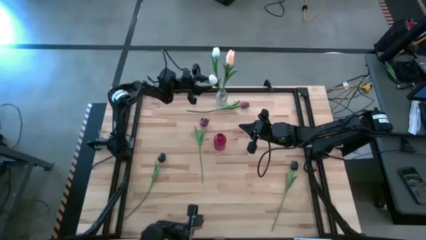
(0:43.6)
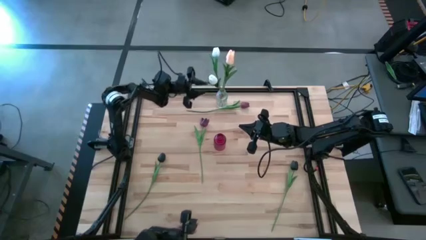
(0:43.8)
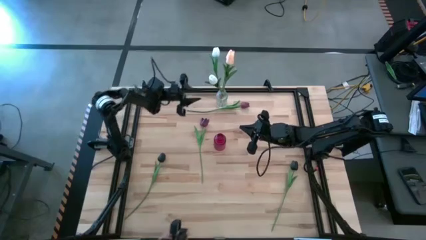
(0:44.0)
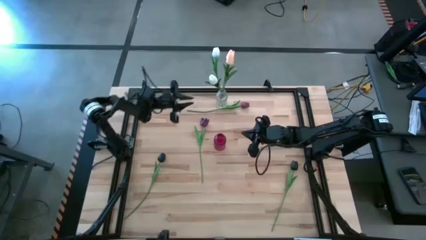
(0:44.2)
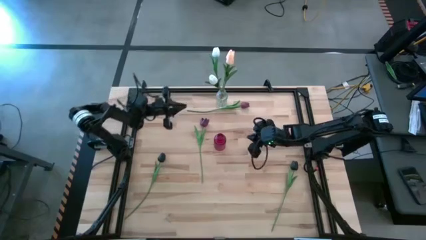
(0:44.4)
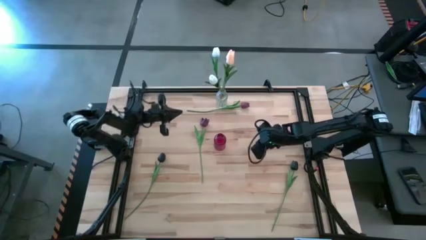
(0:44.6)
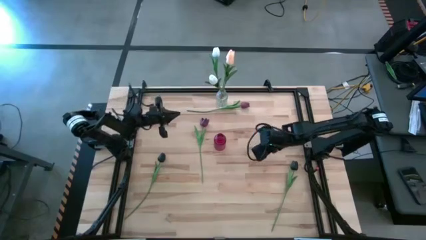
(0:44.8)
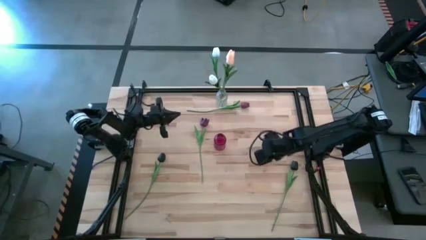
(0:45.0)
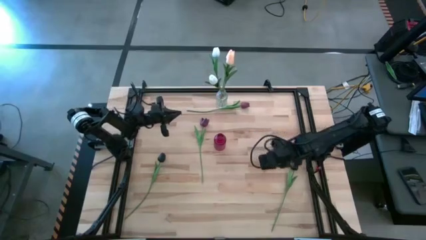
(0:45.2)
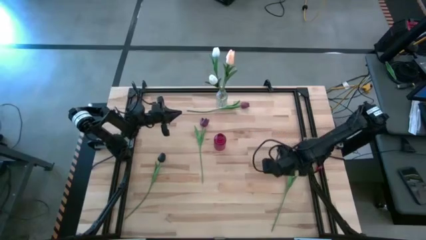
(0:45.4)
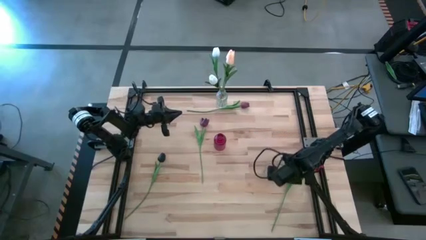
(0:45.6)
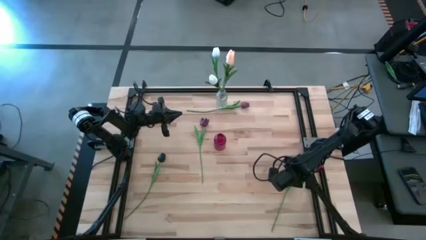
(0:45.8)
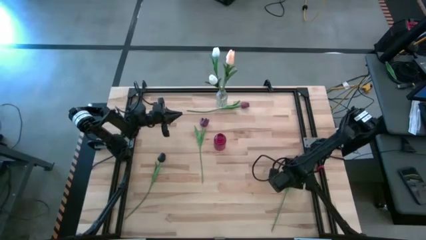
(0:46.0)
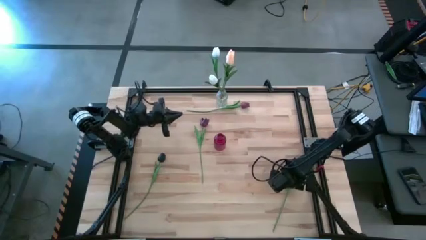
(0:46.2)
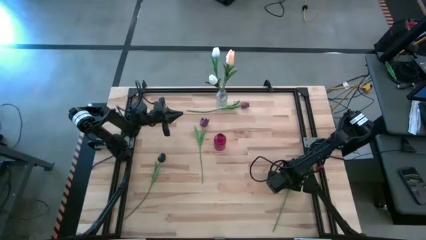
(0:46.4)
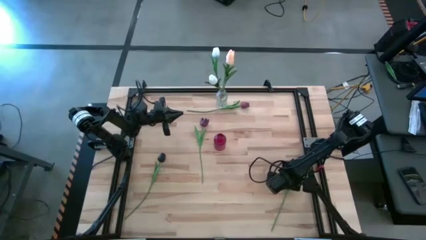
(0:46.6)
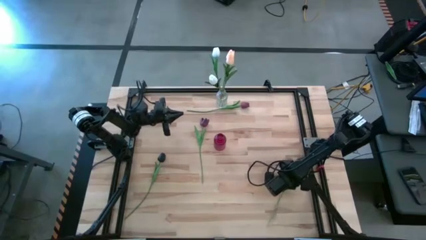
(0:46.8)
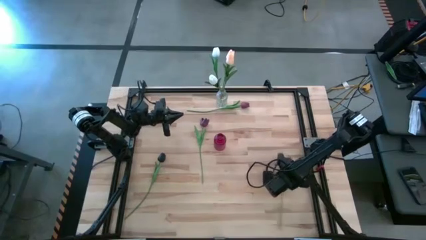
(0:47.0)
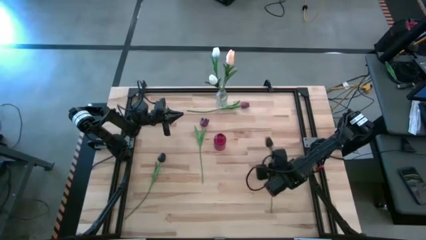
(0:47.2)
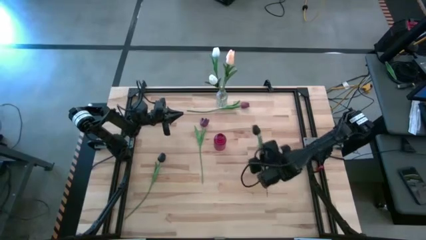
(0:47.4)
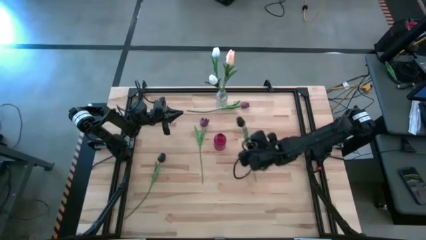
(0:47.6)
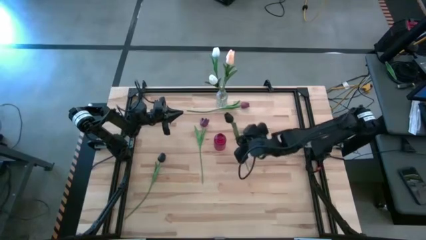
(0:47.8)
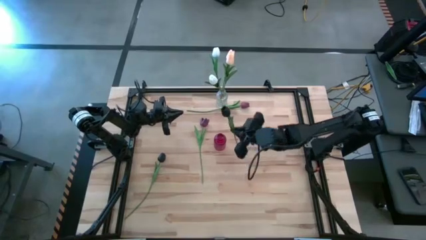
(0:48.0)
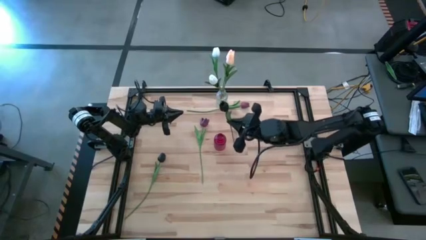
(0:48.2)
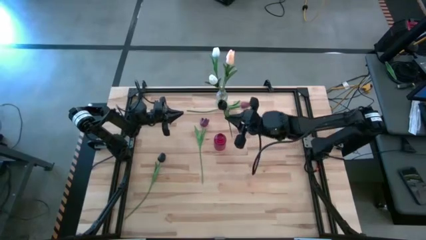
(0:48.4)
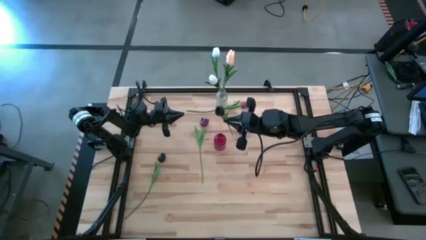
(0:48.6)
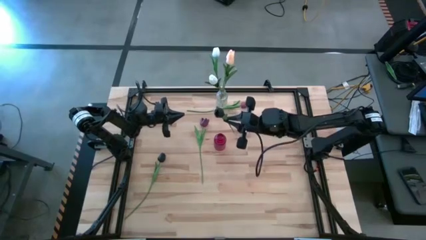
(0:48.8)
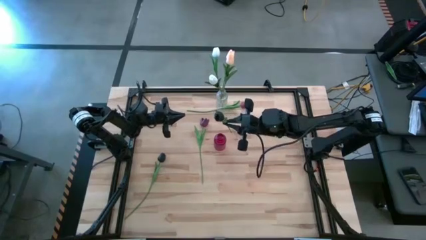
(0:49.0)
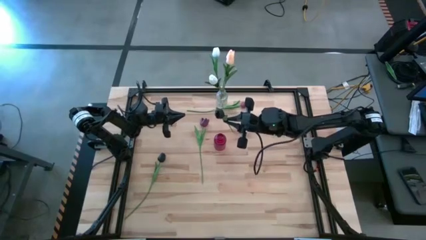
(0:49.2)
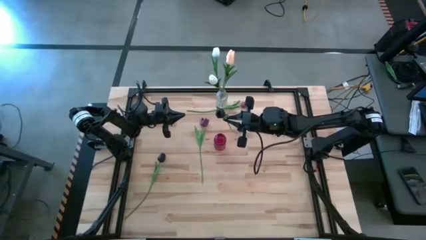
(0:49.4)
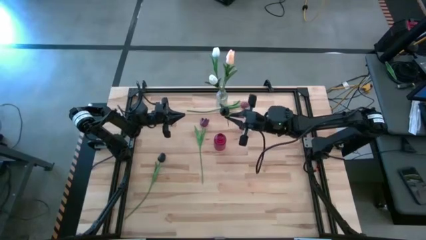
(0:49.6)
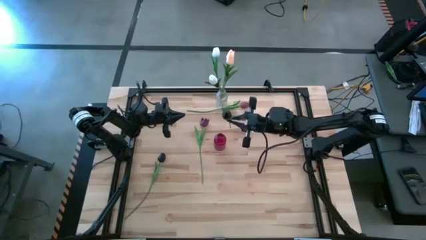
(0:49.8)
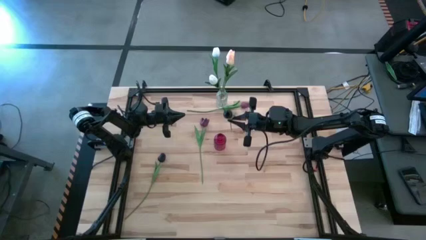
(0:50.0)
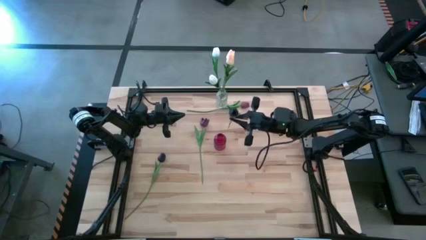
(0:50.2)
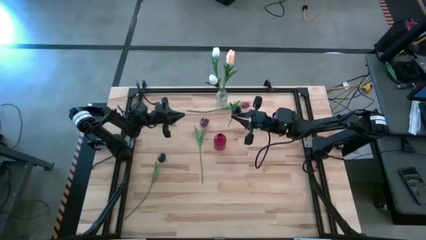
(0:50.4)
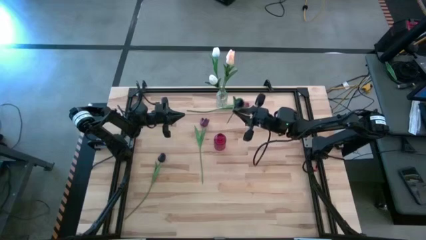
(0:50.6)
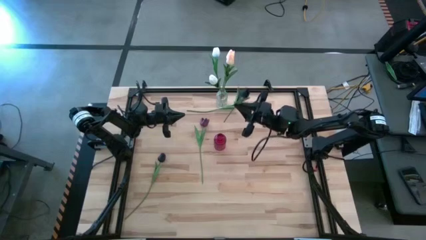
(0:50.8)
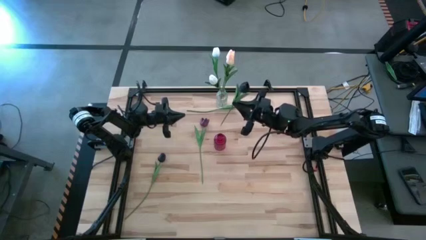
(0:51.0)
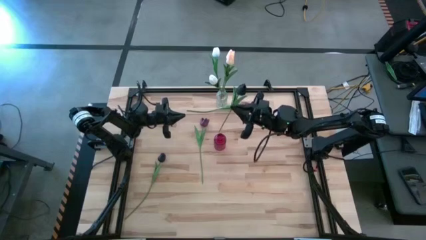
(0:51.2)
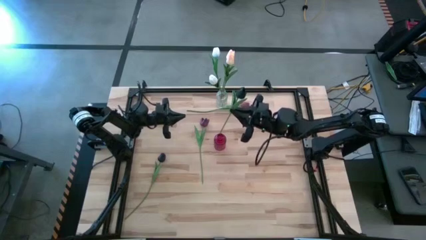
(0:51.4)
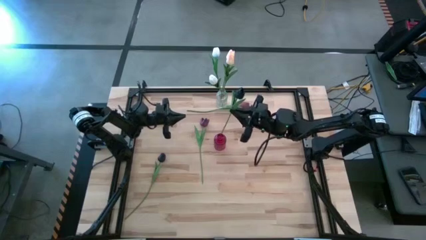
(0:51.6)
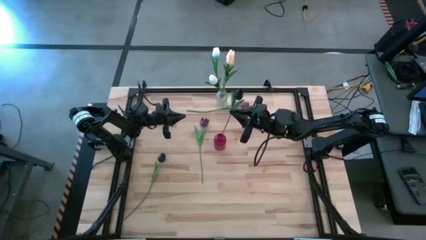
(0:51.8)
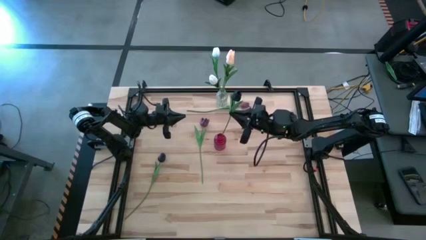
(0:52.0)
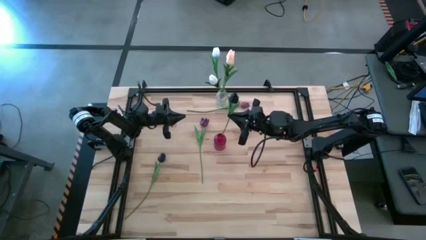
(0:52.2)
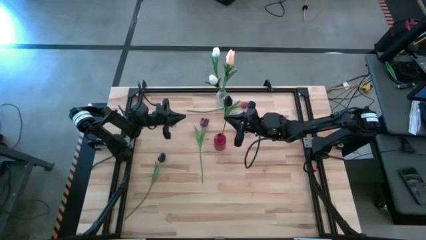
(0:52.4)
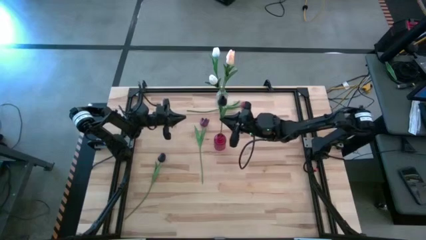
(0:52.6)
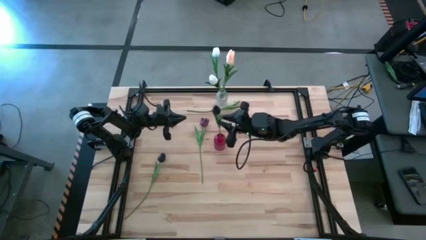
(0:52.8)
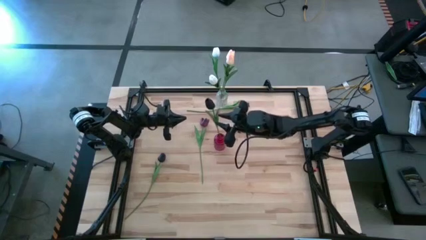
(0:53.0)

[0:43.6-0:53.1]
Task: Sort flowers into vase by color
Put the right black flower into the red vase

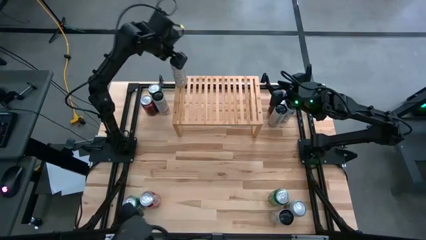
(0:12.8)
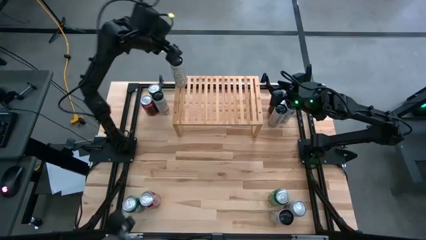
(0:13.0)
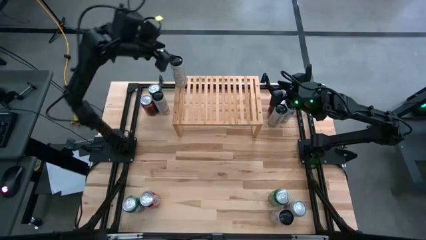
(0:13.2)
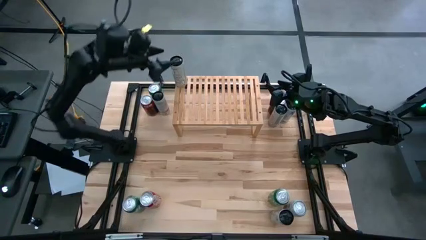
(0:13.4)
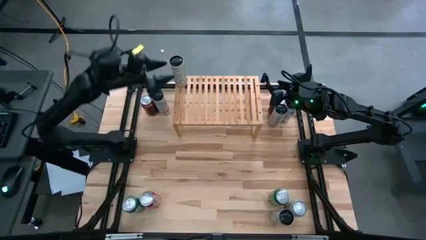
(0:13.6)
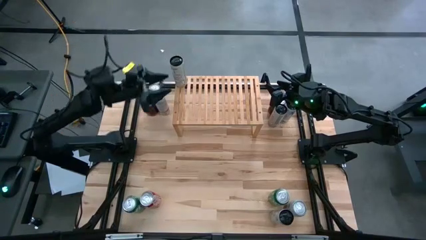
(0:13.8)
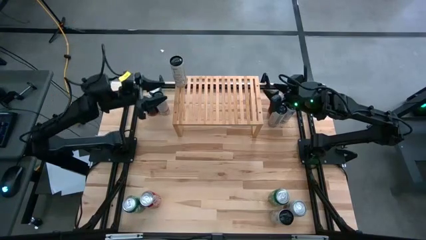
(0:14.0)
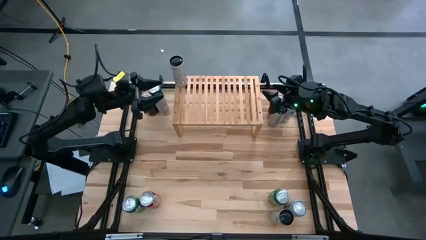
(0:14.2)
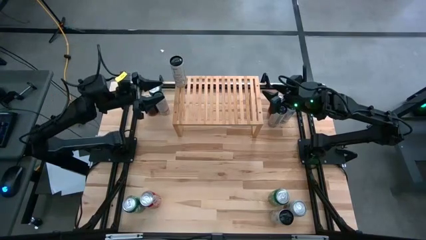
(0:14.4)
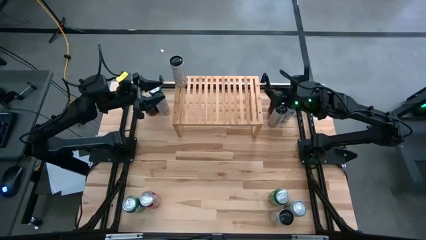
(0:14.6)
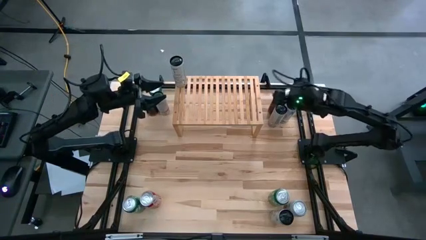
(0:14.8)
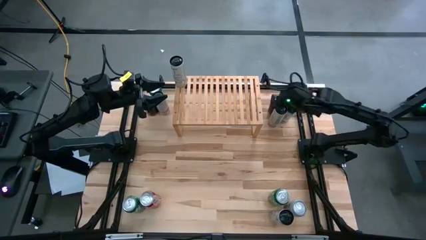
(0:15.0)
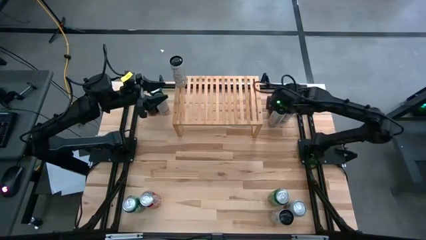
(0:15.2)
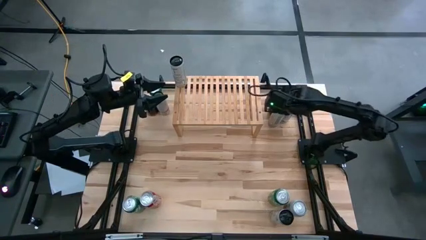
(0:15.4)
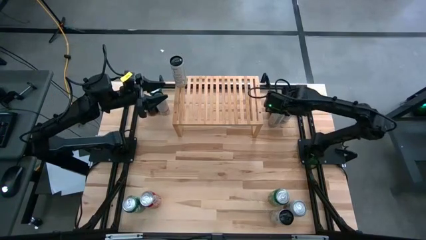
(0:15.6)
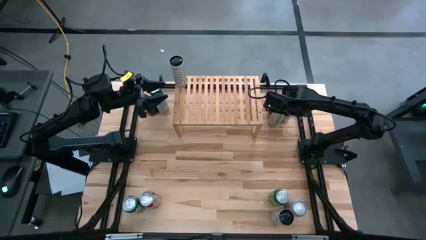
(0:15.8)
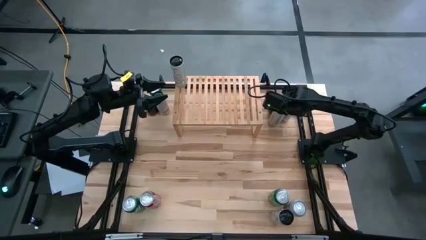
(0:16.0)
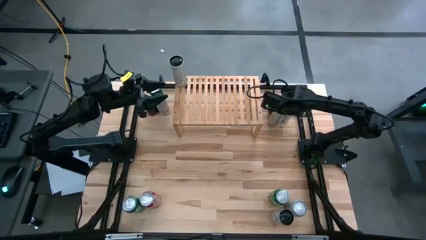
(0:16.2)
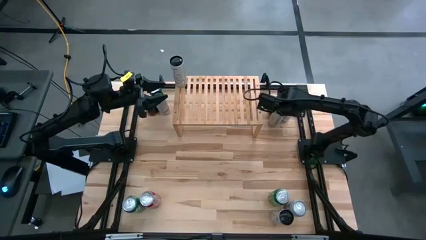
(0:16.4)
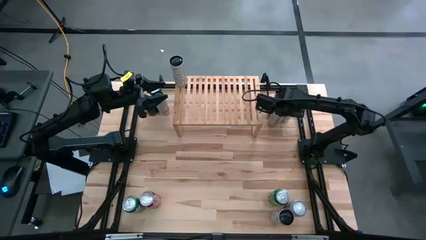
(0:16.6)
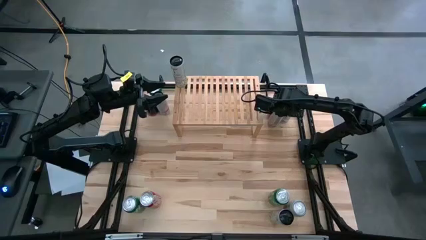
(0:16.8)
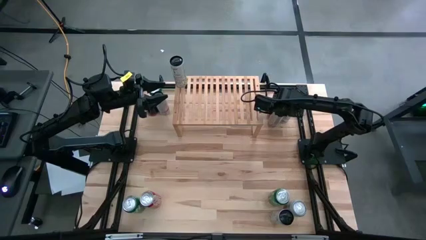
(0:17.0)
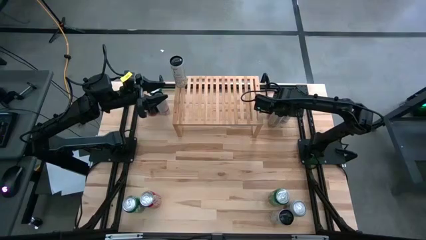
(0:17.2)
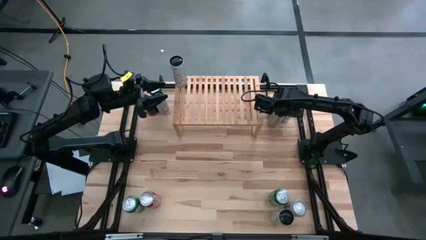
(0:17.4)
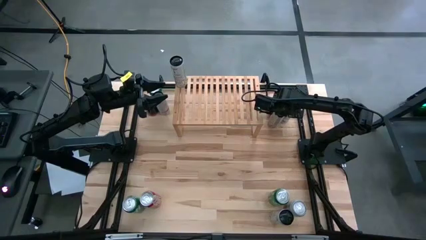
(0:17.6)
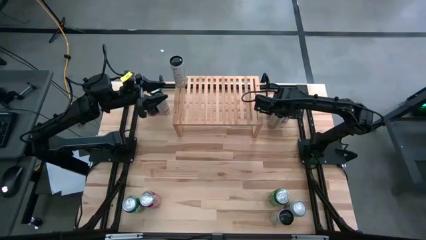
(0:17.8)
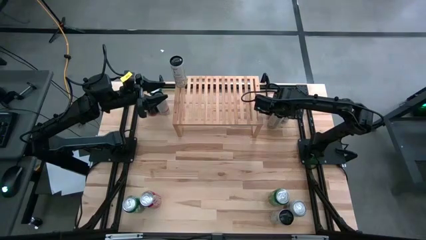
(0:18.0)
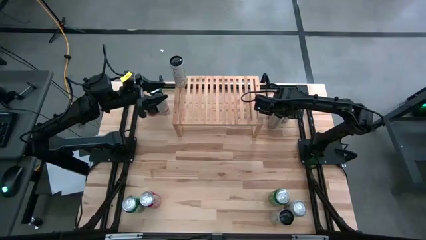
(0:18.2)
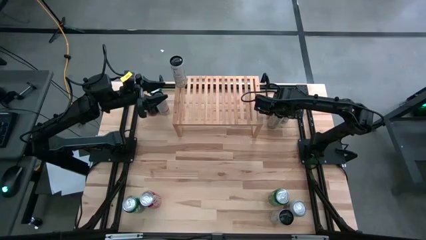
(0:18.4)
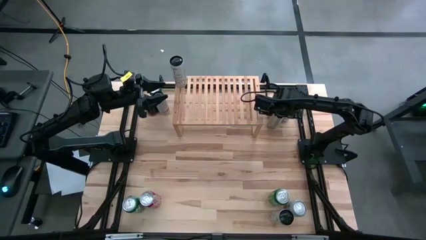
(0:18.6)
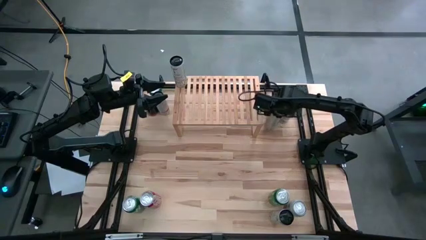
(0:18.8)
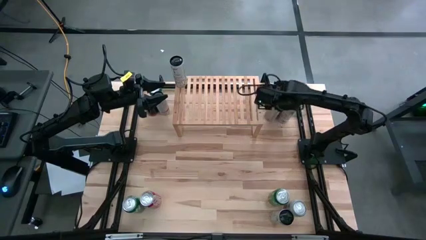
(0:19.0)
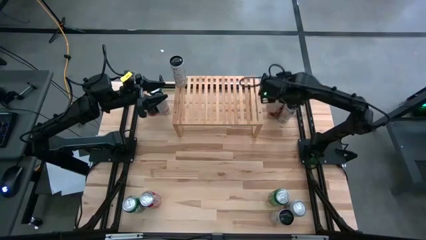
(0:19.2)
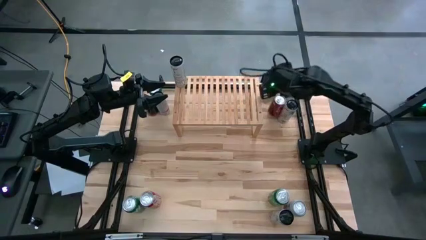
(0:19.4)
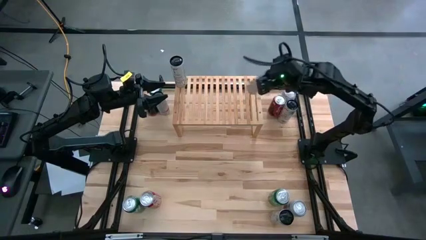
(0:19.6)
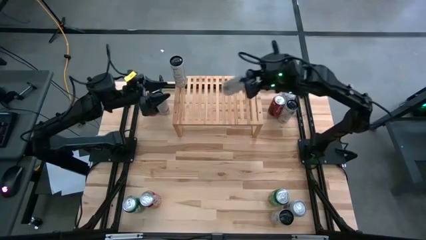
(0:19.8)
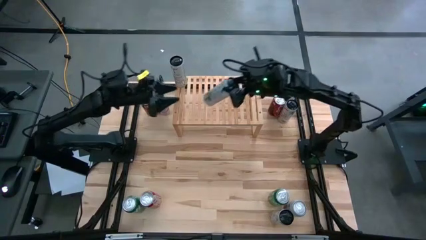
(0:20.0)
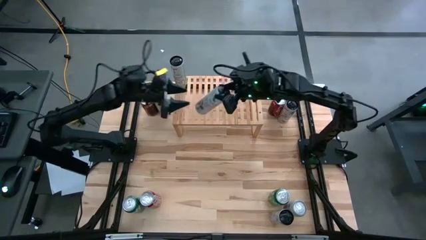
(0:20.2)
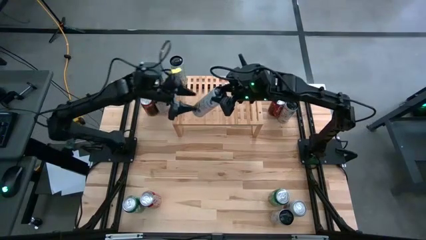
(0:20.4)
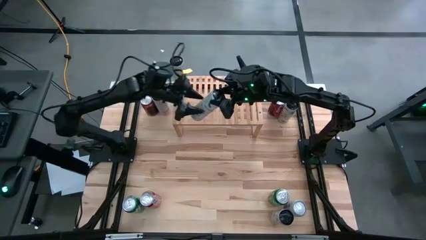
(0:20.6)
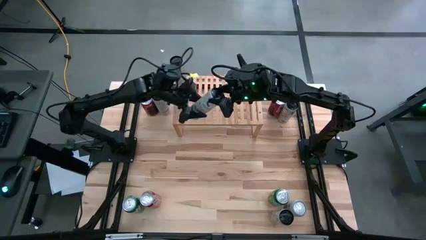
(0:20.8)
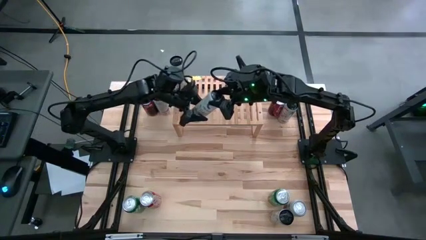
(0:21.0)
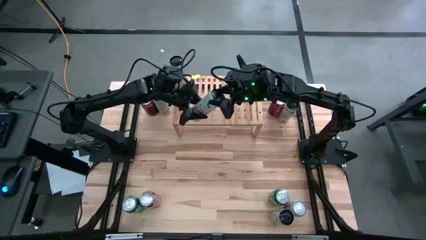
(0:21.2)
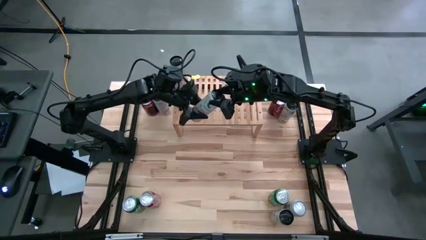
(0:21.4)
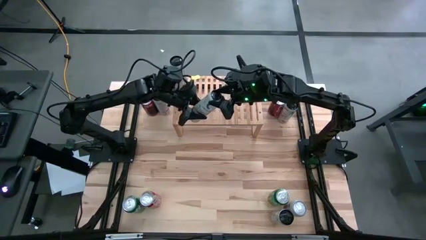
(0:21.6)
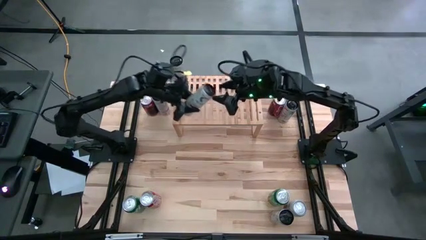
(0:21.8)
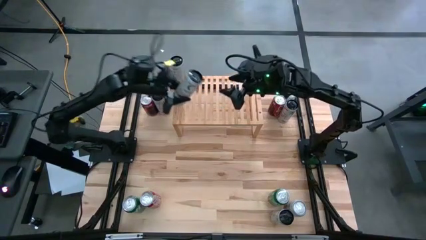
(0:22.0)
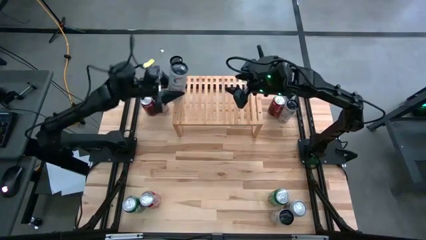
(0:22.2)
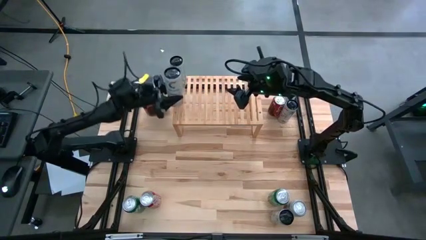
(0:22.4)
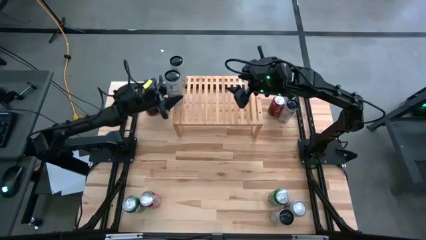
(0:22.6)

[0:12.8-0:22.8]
Task: Place canned beverage on shelf
Put the white yellow soda can on the shelf aligned with other white yellow soda can
